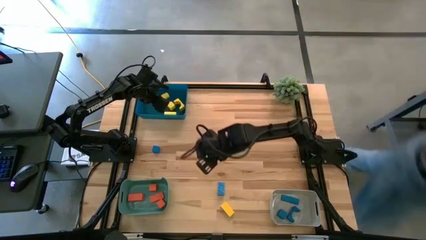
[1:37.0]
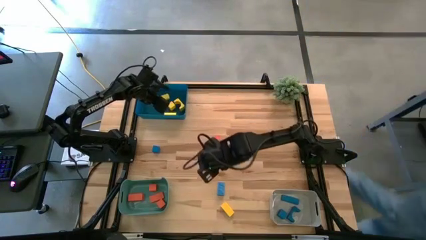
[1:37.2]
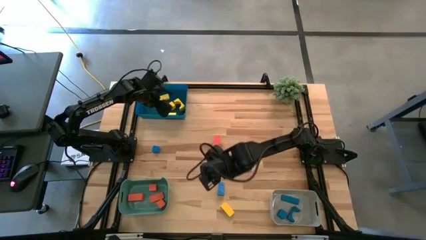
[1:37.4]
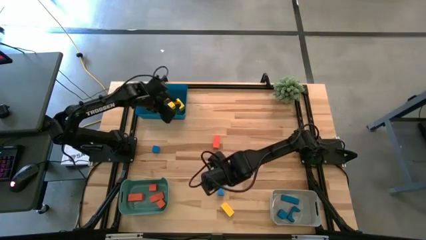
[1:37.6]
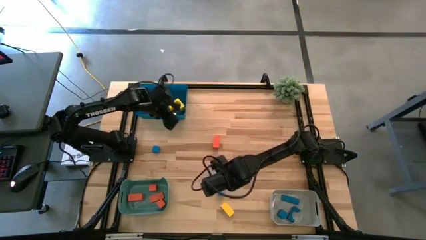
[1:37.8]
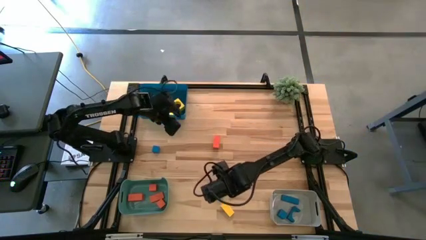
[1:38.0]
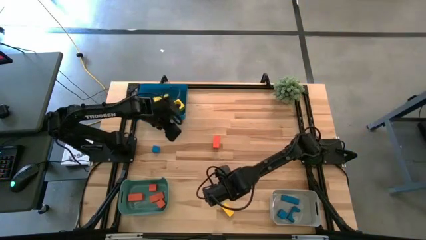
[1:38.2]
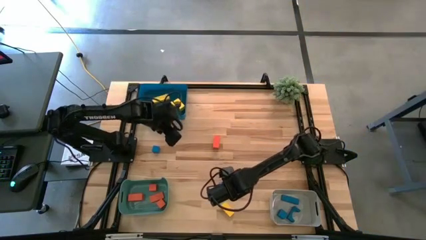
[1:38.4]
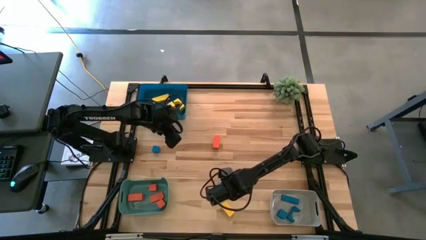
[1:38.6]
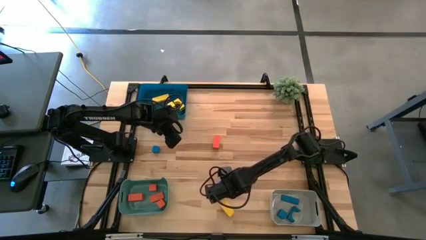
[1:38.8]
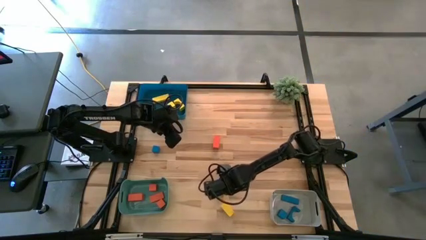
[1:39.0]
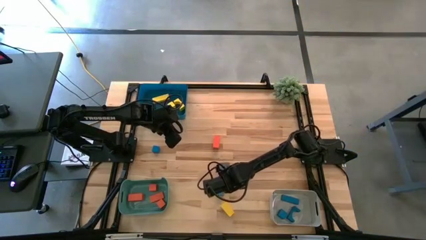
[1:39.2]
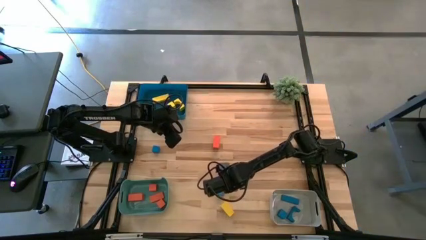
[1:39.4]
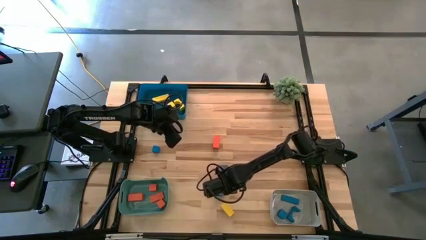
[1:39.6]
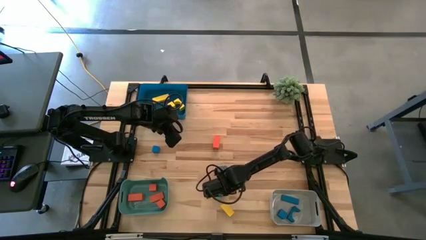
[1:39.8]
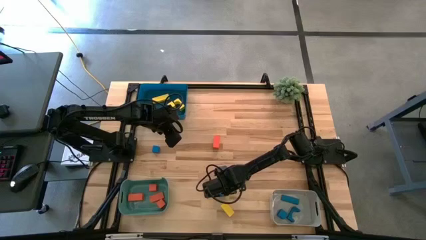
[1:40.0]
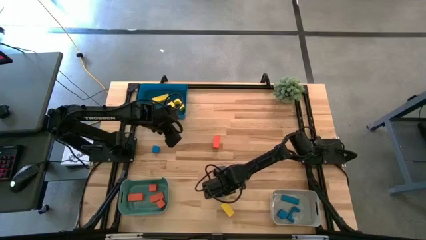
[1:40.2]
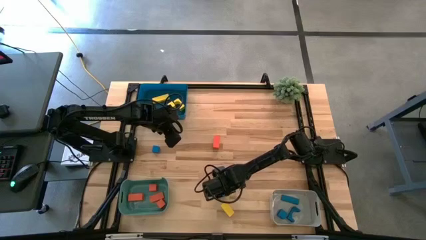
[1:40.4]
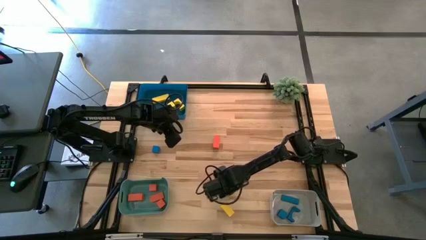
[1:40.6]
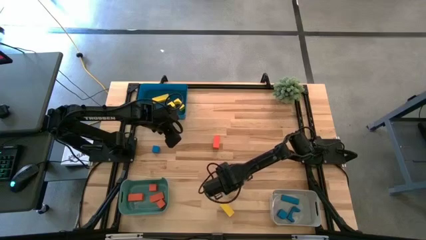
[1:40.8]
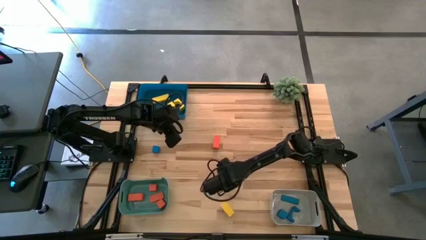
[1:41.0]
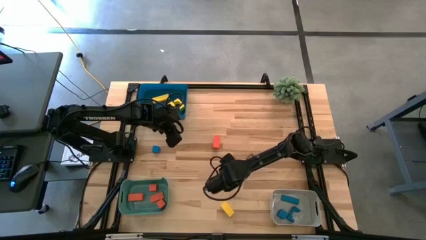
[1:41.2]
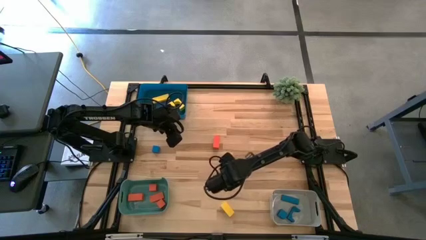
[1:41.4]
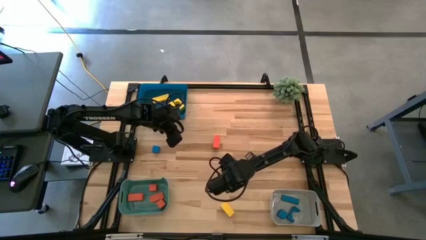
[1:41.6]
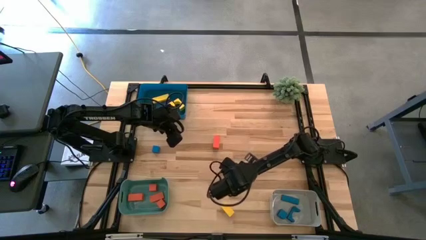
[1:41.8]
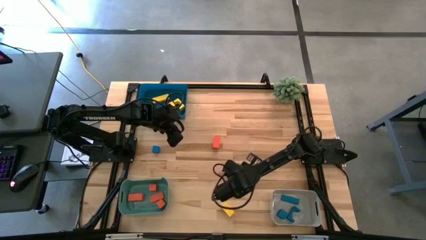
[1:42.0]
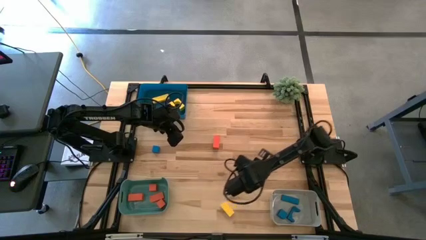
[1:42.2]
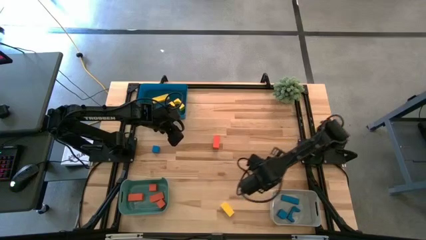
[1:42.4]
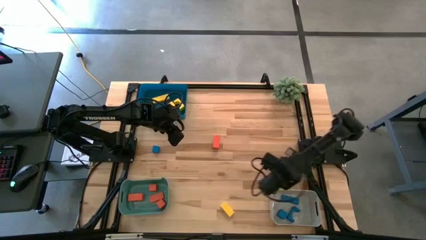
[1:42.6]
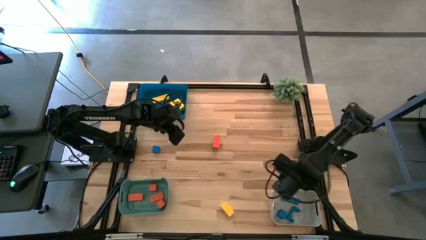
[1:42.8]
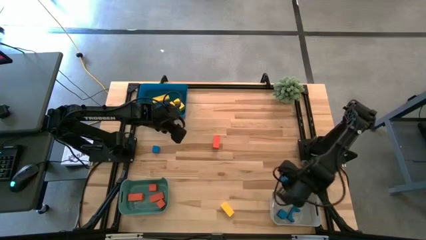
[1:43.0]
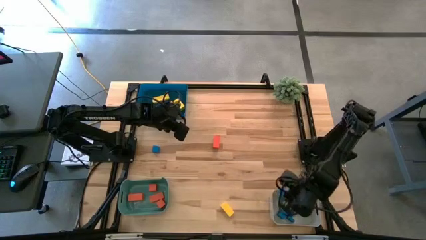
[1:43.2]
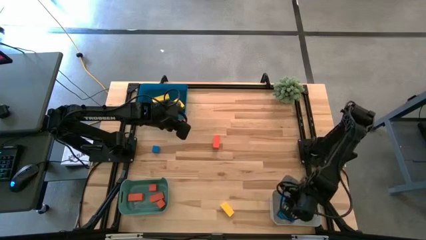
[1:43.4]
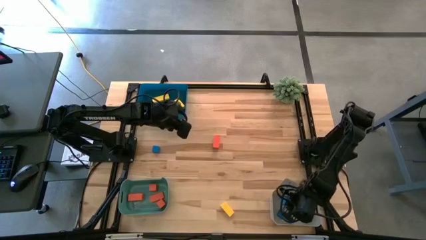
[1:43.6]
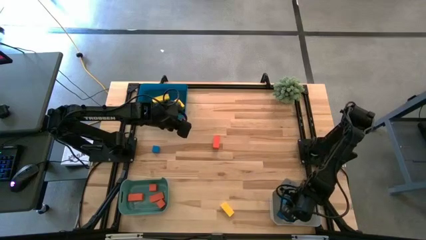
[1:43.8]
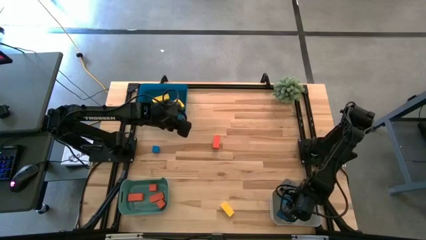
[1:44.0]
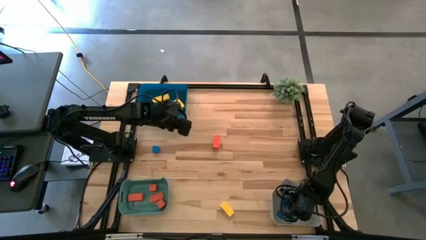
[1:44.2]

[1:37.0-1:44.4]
Task: Sort & place blocks by color
Put the bottom blue block into the white bin

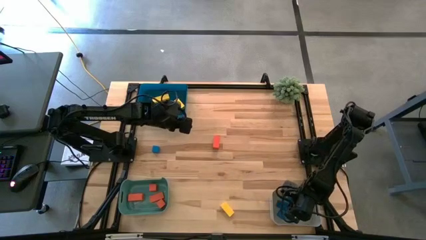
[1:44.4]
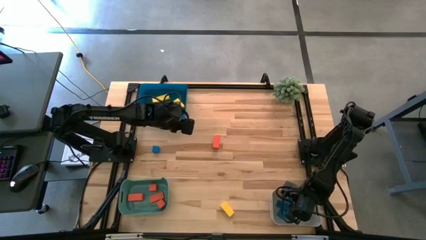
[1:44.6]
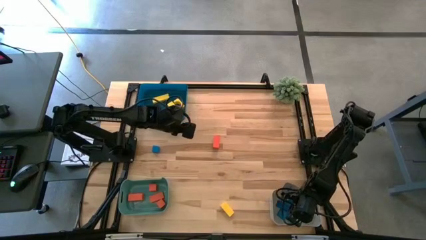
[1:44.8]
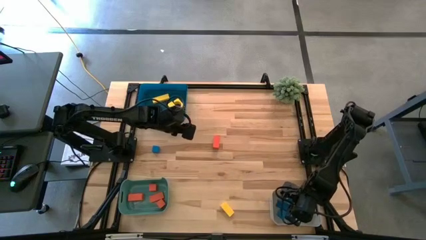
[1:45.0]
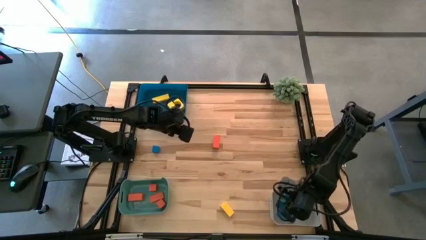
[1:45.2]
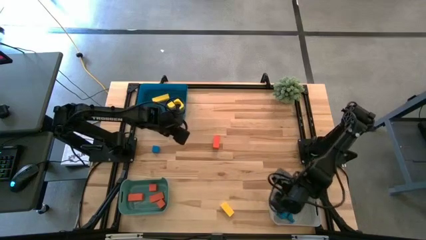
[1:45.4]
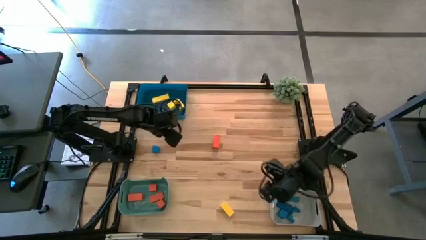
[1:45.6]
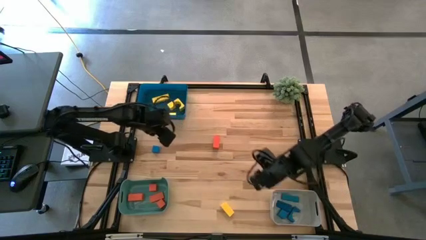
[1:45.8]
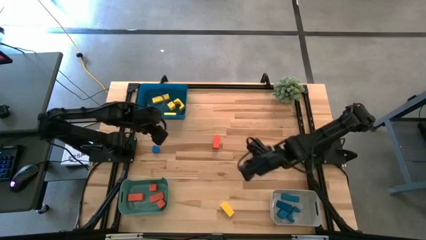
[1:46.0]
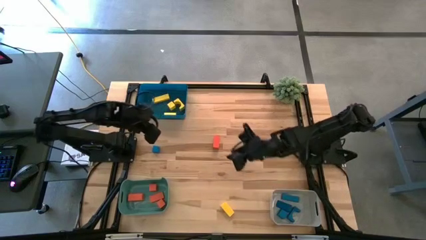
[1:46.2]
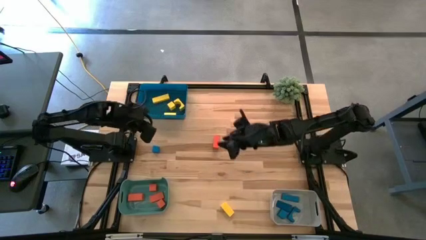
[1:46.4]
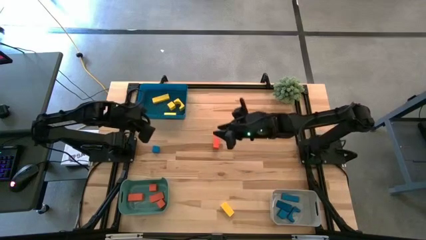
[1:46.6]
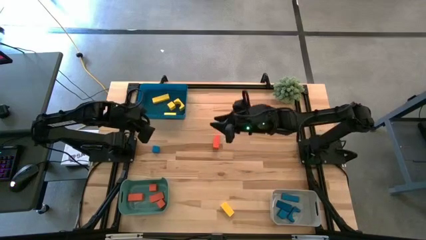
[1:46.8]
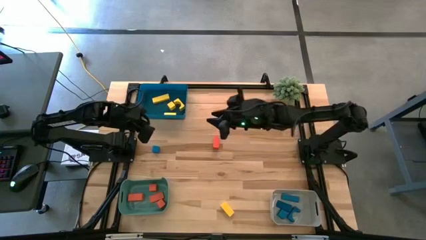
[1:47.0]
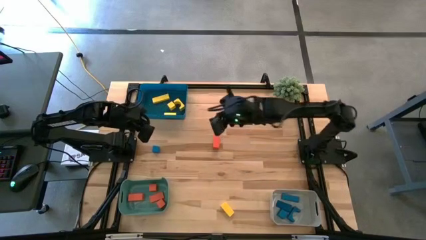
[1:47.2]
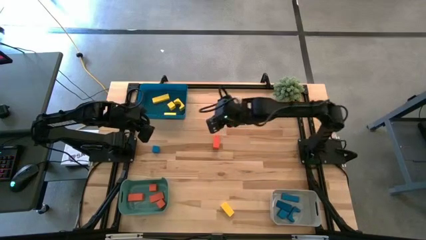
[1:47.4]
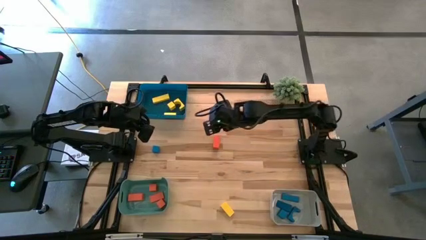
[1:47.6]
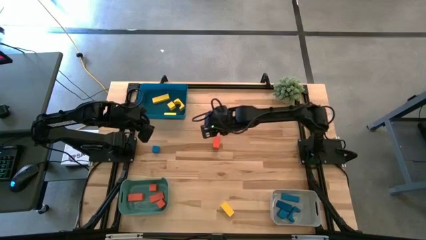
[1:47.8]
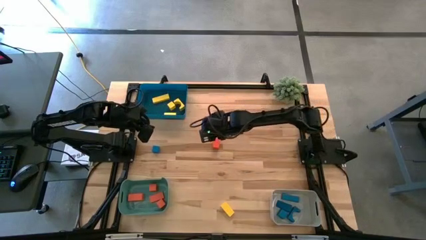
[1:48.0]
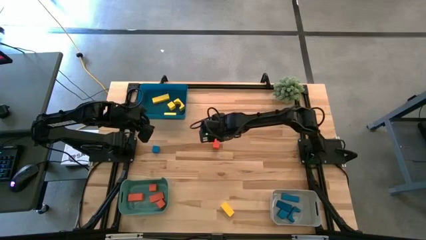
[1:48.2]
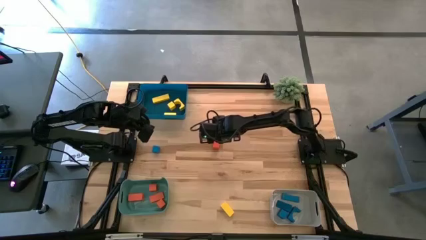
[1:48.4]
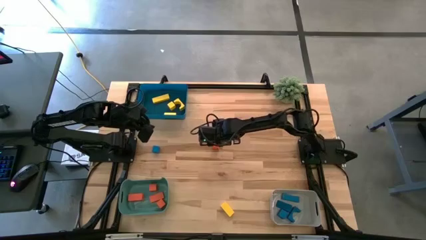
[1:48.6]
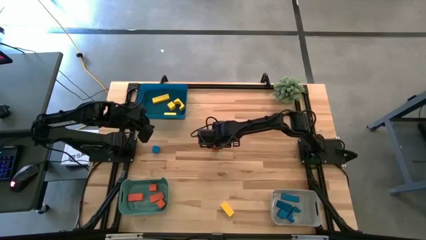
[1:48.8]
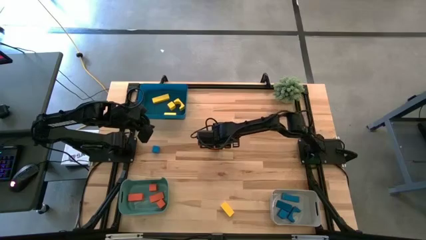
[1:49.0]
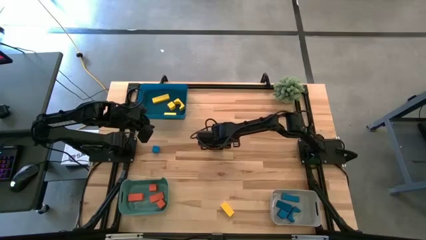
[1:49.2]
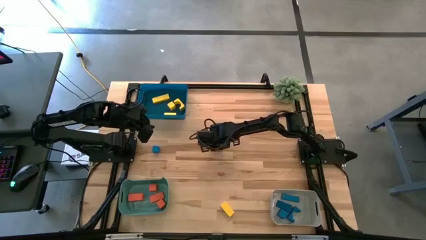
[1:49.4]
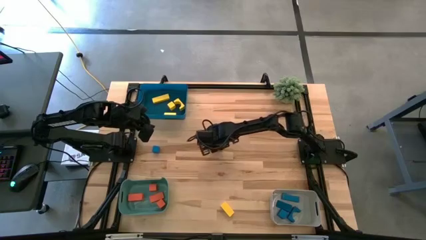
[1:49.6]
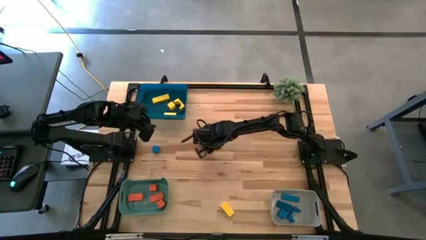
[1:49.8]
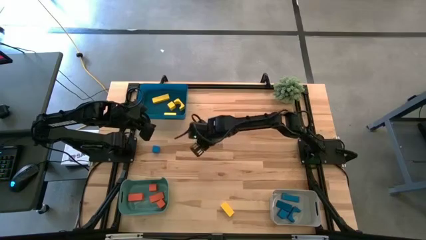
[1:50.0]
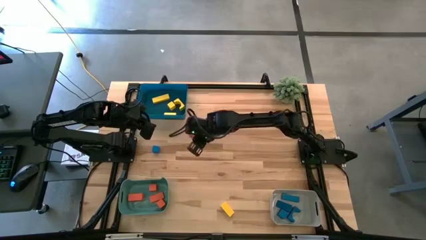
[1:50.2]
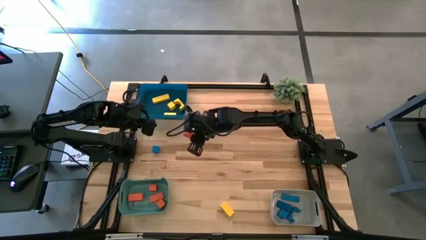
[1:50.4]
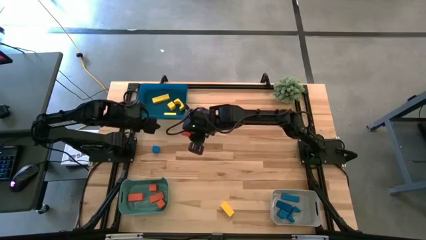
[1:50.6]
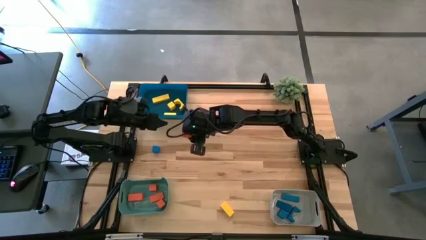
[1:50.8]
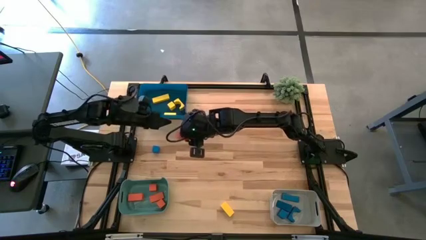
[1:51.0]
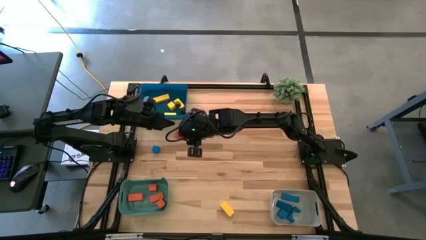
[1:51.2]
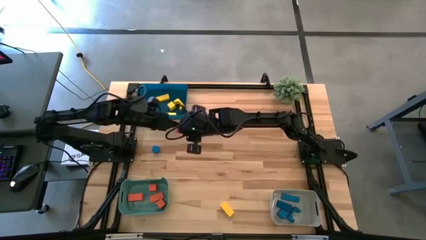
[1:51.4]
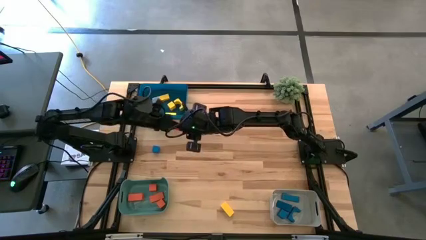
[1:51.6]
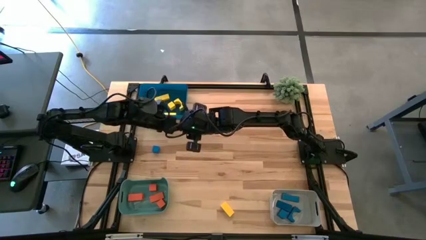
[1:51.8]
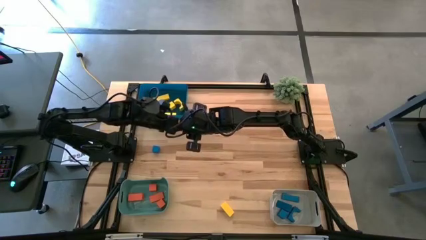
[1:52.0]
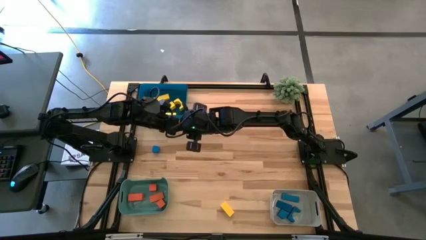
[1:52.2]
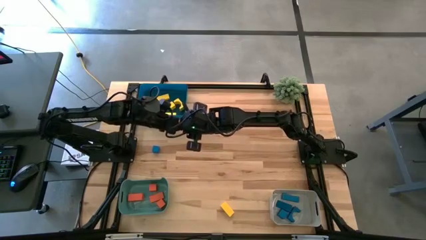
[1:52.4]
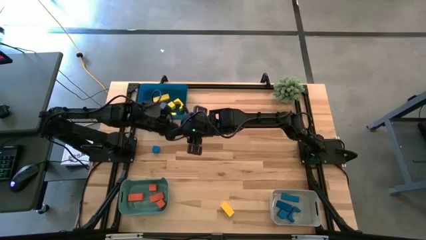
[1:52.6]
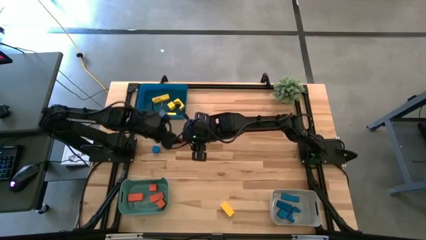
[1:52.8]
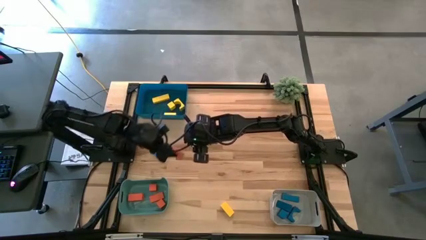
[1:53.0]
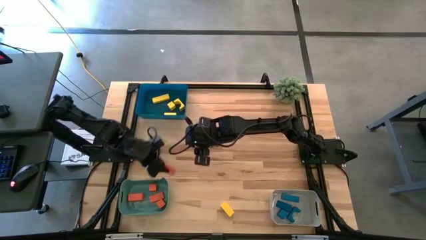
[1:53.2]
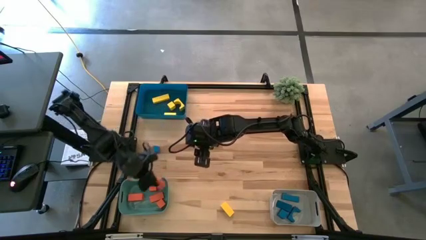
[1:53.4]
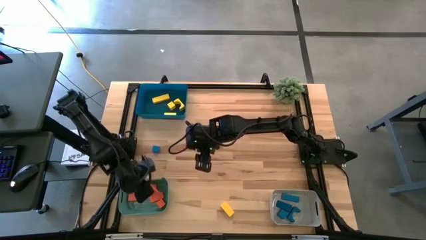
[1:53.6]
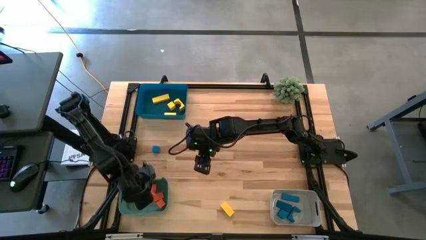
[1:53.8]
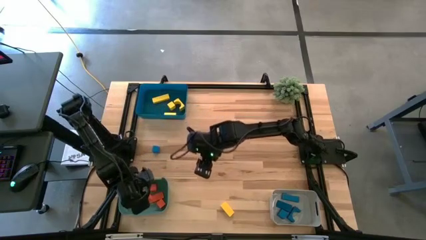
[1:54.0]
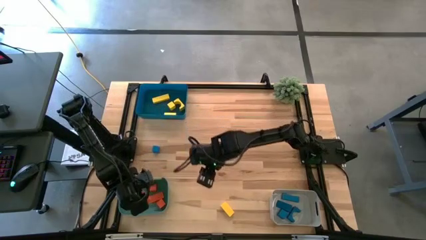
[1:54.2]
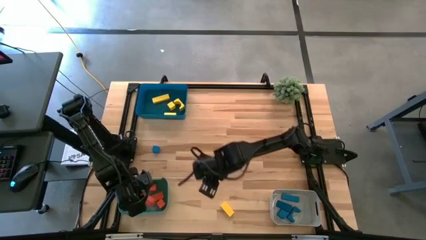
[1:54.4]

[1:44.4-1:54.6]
Put the orange block into the green bin
